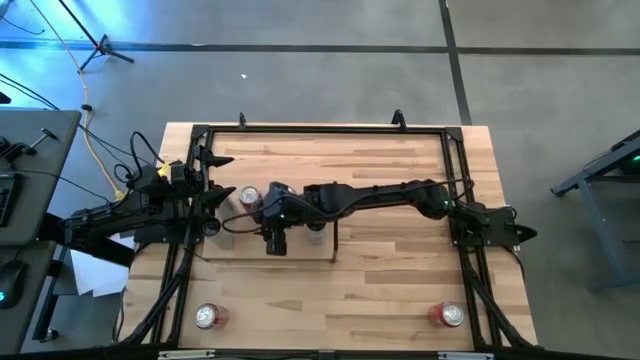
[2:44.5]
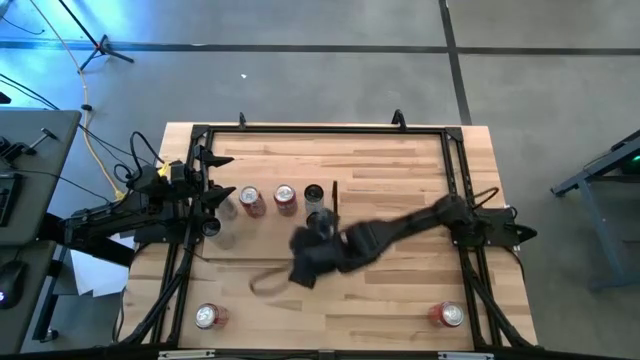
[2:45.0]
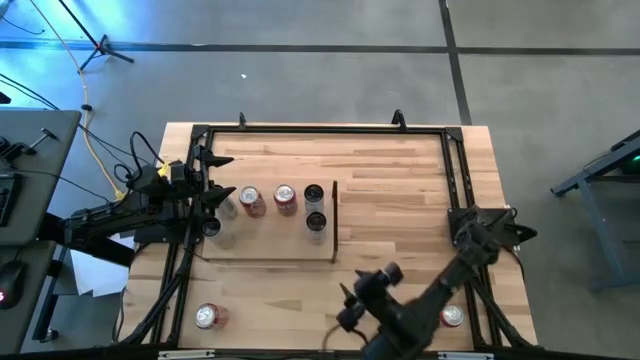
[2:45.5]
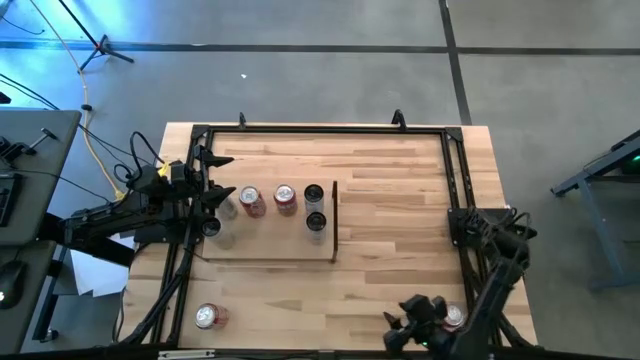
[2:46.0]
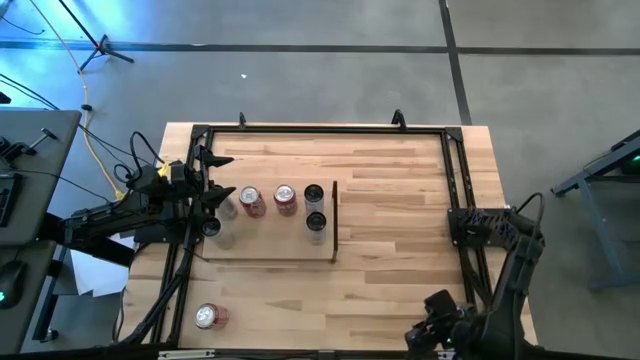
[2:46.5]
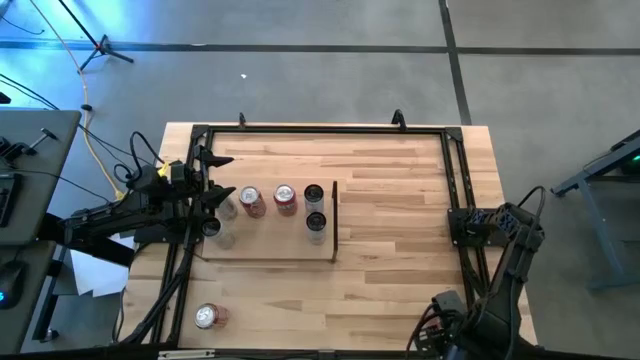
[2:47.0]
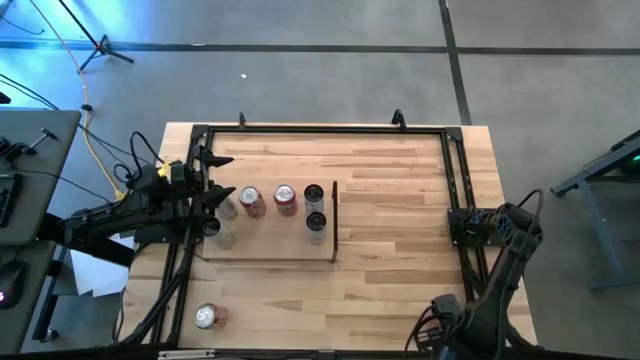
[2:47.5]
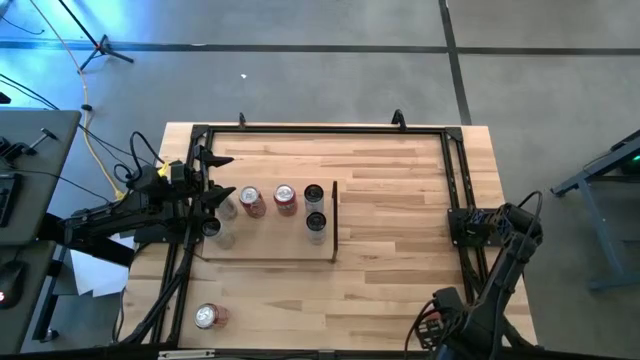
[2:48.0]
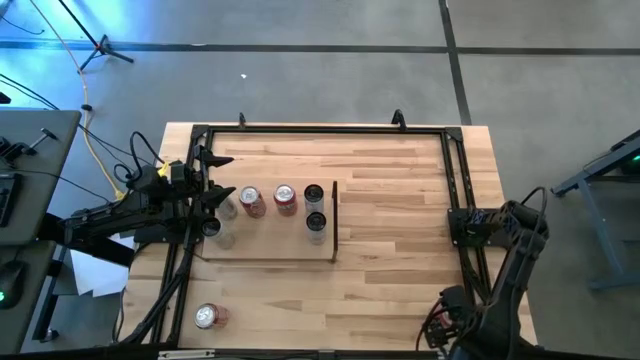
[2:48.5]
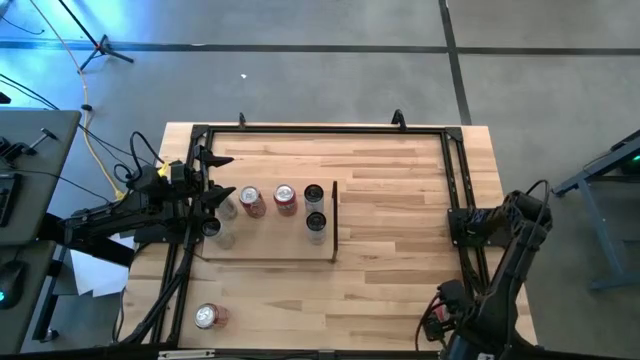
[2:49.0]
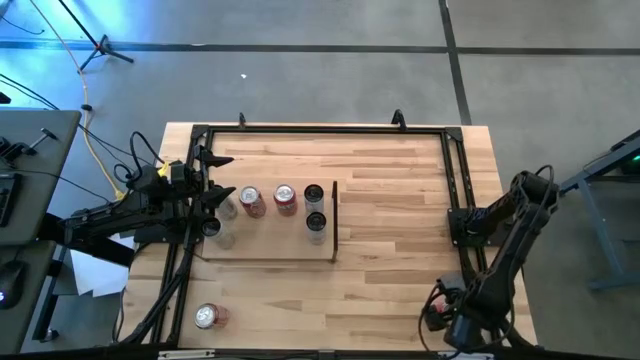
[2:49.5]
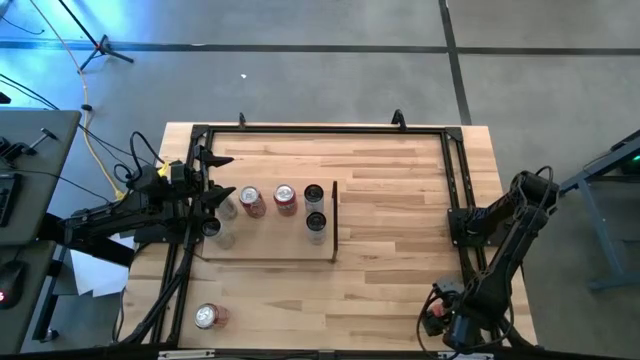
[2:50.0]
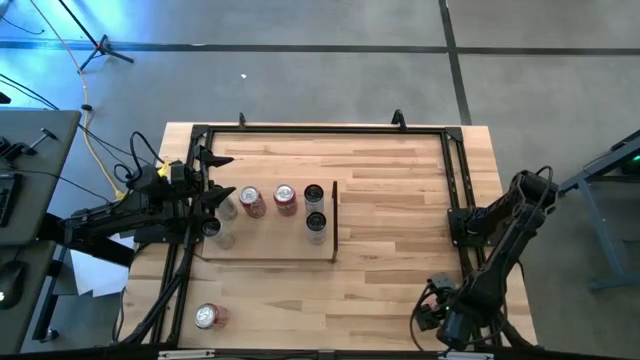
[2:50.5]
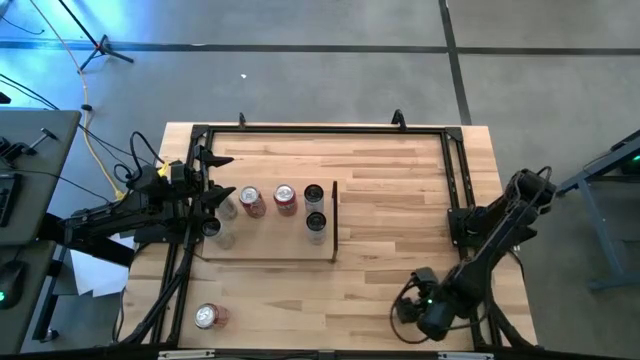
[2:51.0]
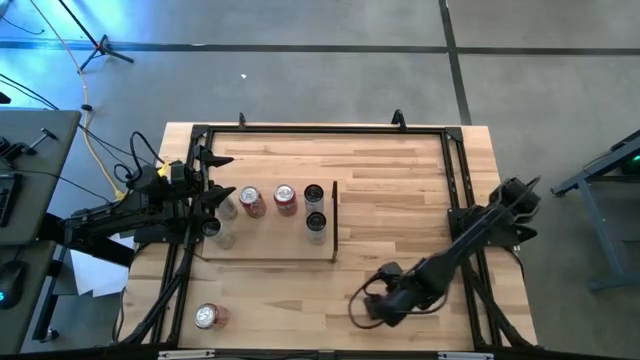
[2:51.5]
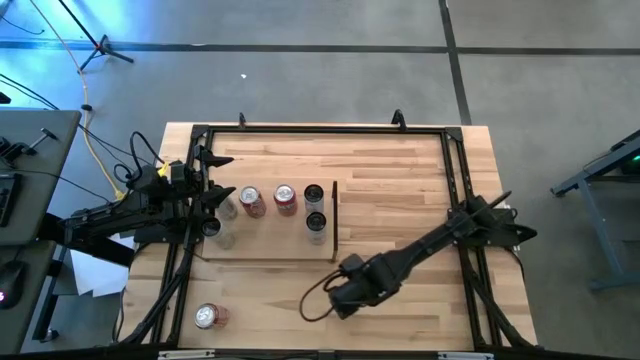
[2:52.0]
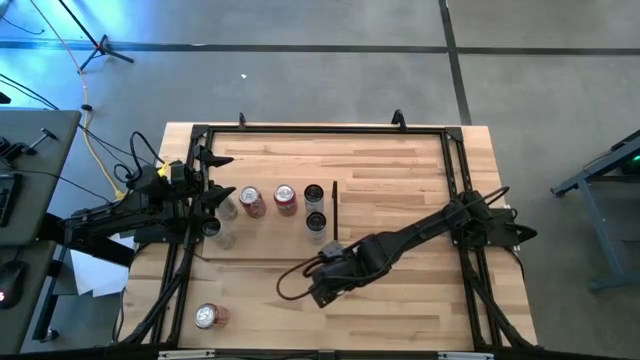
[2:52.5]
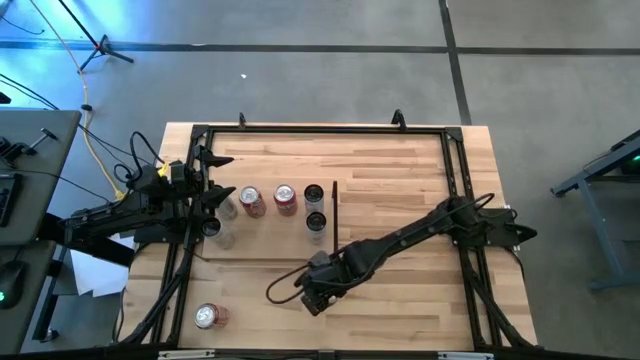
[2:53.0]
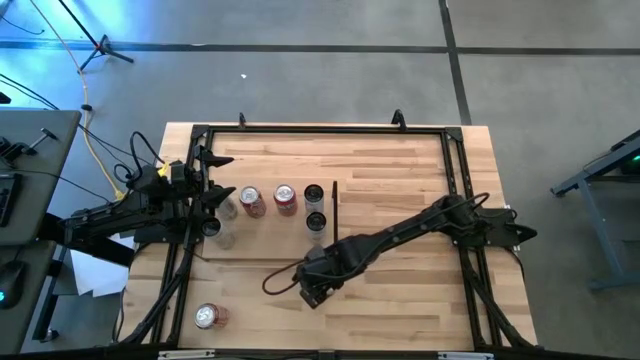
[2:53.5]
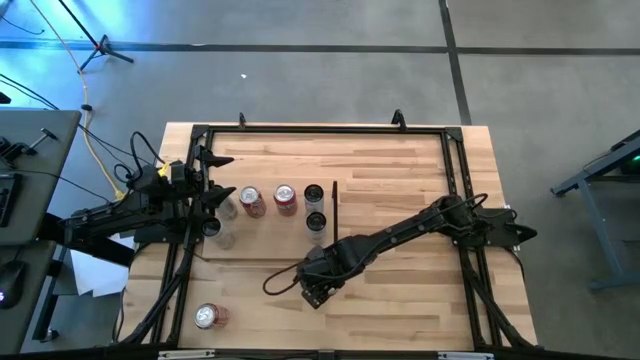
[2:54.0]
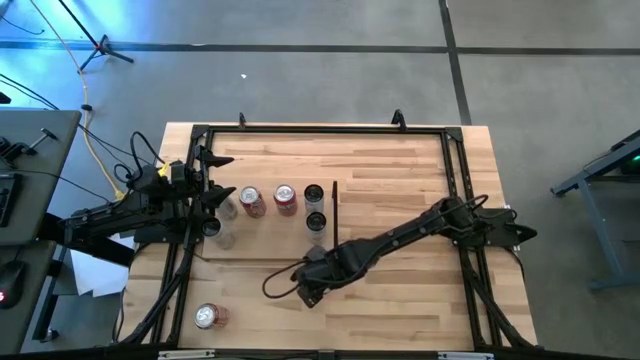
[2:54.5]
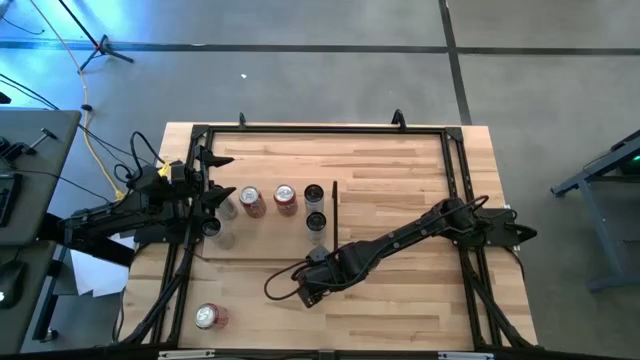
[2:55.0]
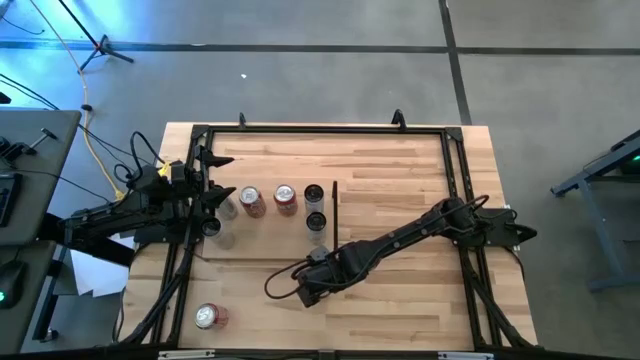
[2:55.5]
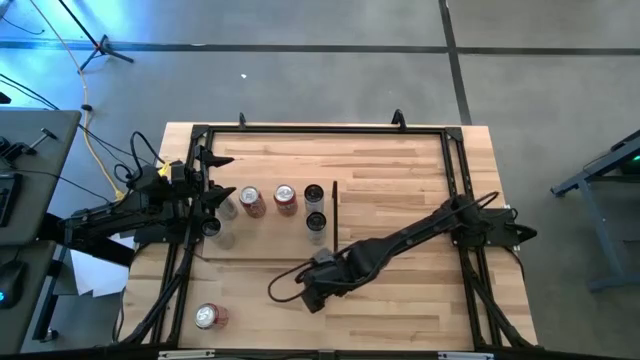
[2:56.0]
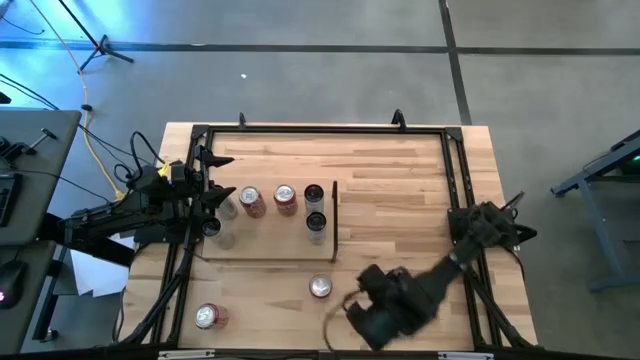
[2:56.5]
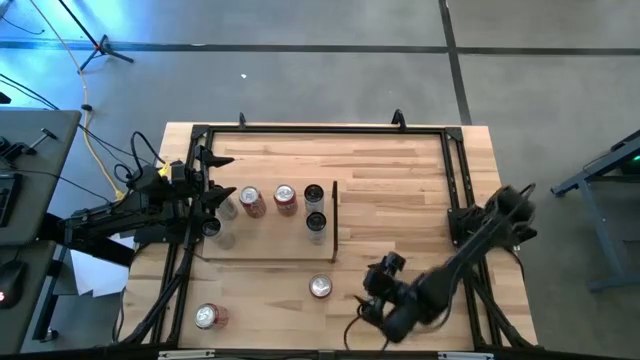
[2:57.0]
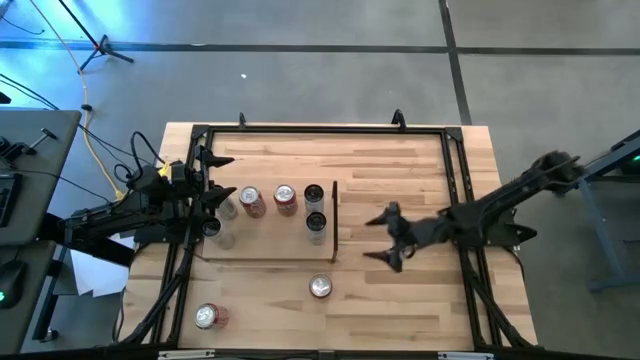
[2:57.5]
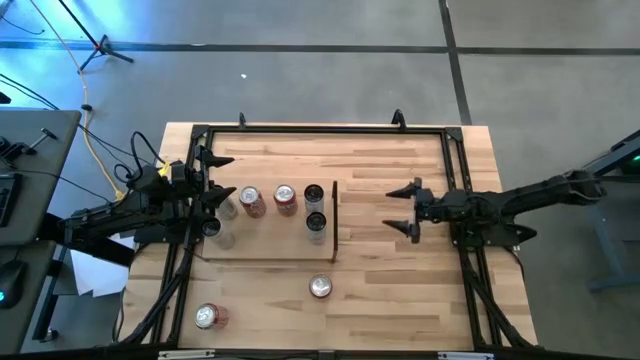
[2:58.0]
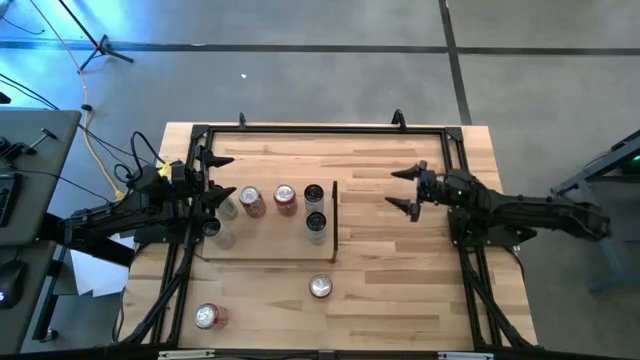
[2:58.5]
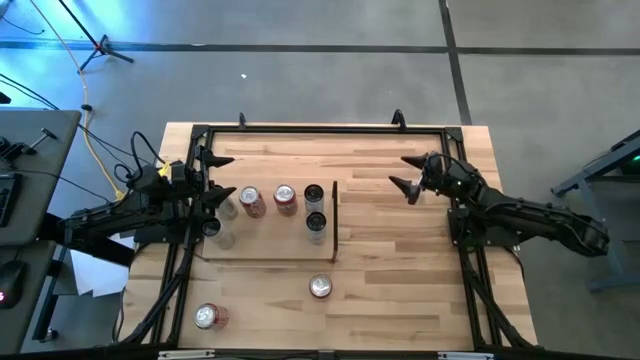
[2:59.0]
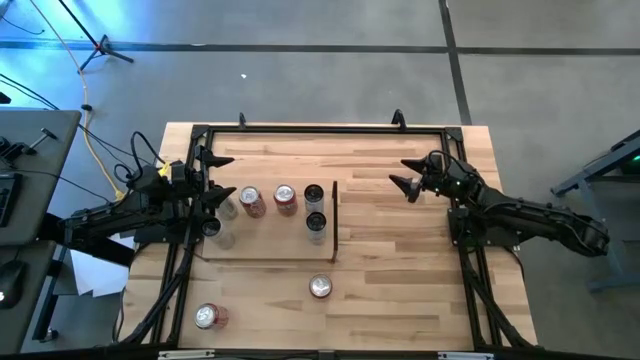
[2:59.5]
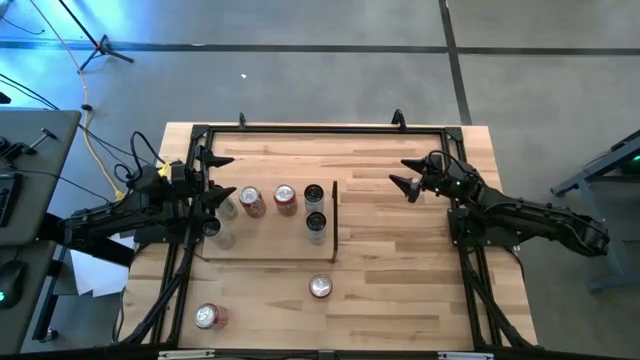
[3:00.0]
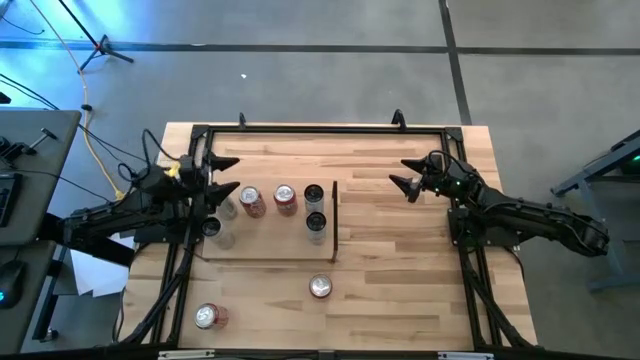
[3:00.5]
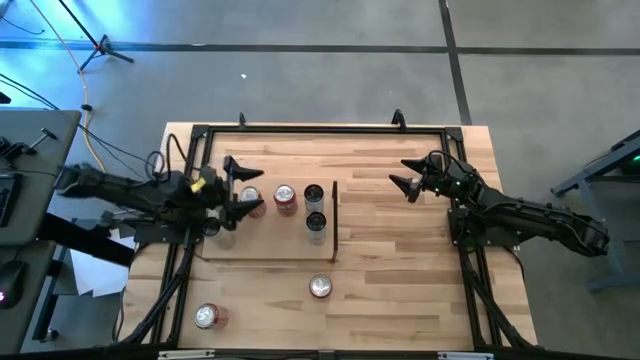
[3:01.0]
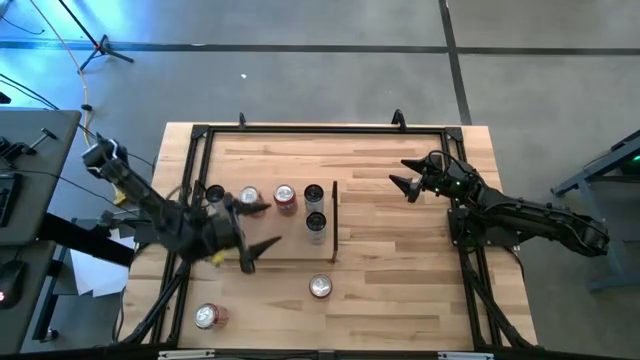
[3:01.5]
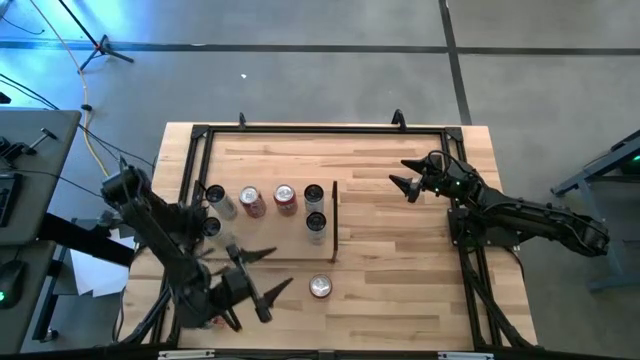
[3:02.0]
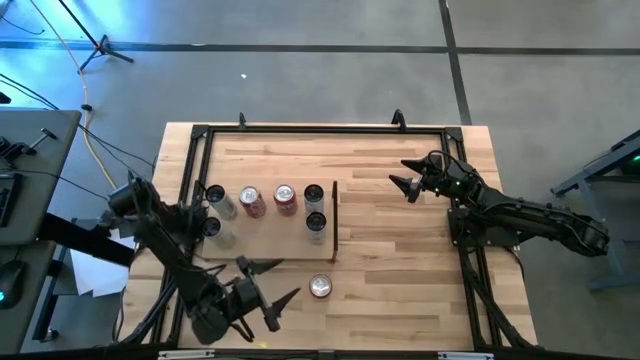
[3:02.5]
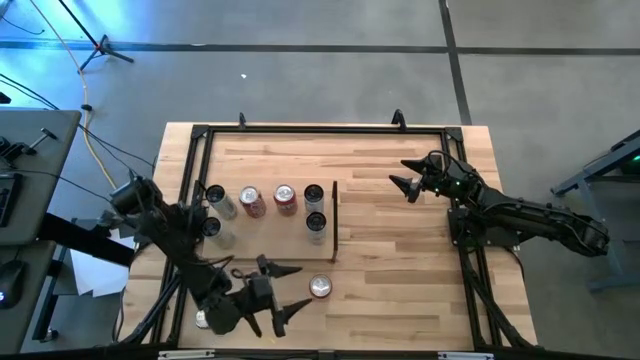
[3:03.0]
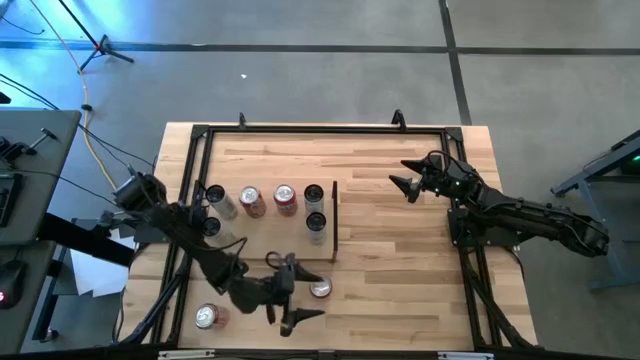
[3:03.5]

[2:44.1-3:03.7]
Task: Place canned beverage on shelf
Put the red soda can aligned with the other red soda can on the shelf

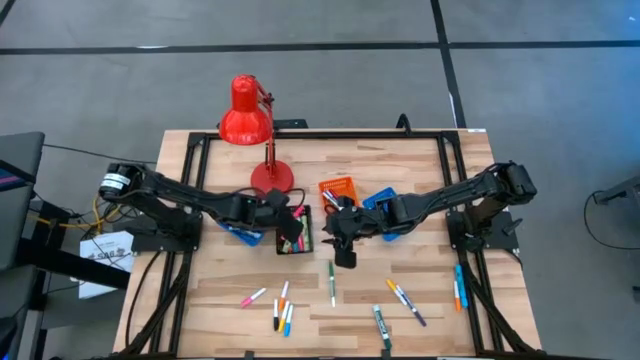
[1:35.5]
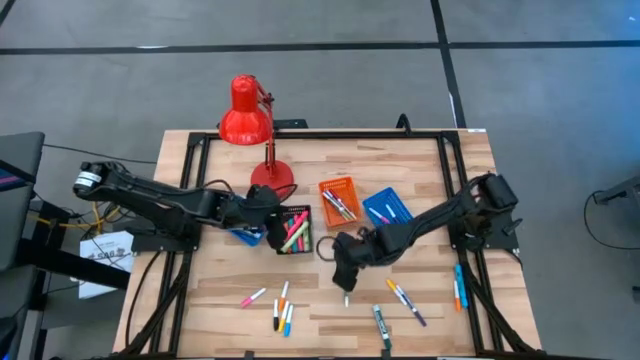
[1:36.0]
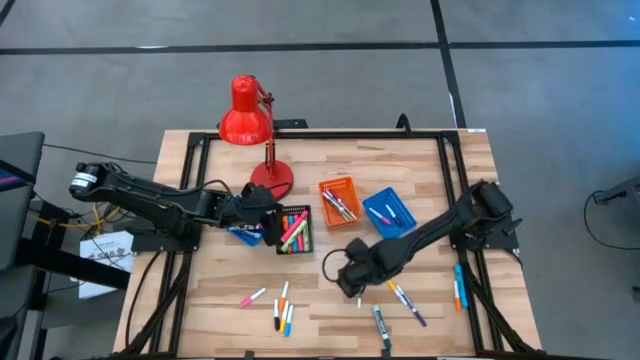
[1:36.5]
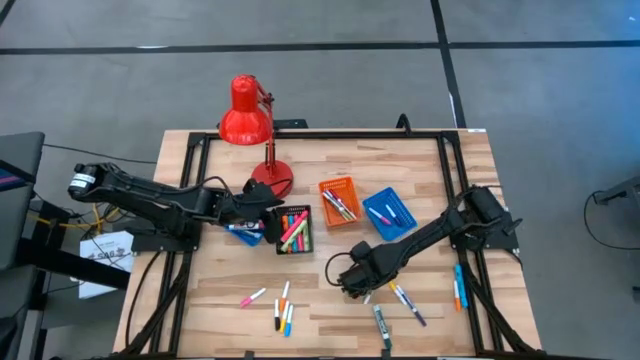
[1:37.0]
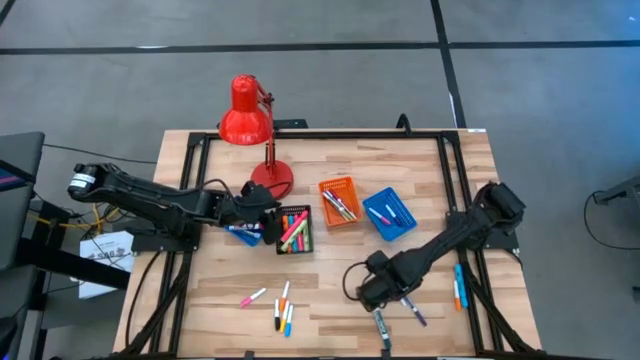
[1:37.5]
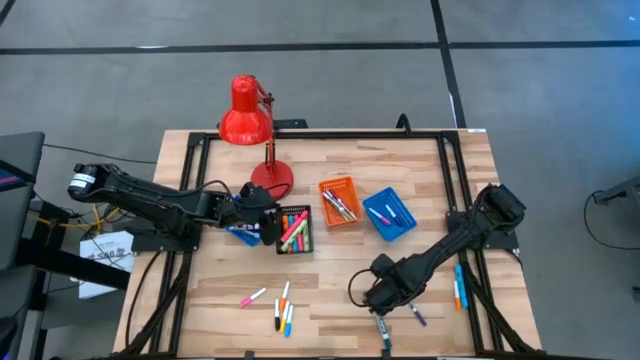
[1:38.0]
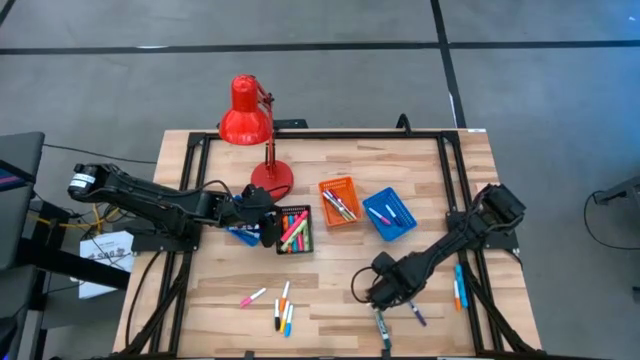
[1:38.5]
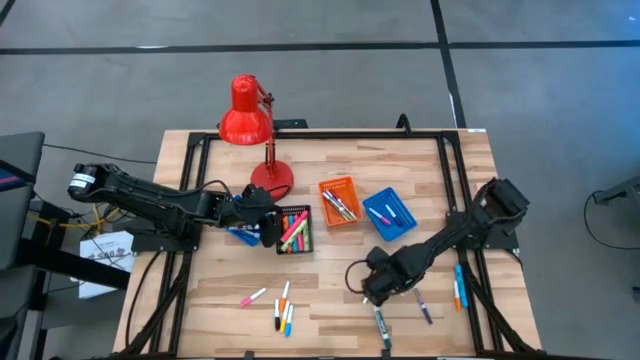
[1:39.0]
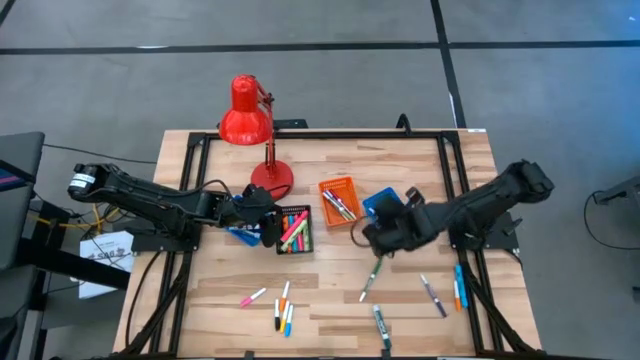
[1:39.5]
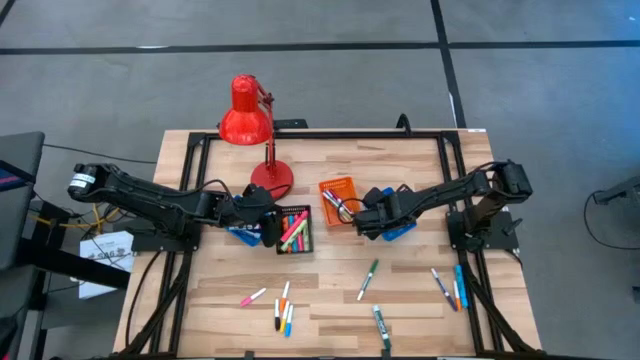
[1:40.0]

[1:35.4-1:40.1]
Task: Pick & Place Markers
Put the right small white and yellow highlighter pen into the right blue basket
